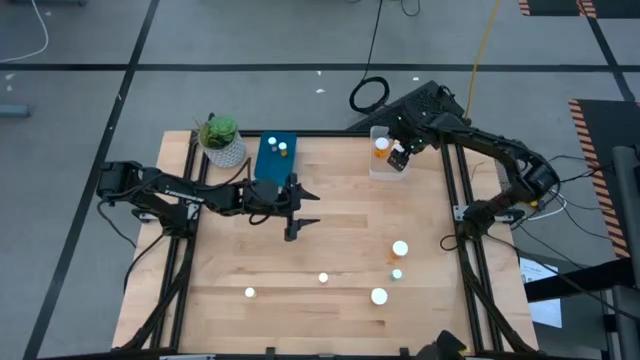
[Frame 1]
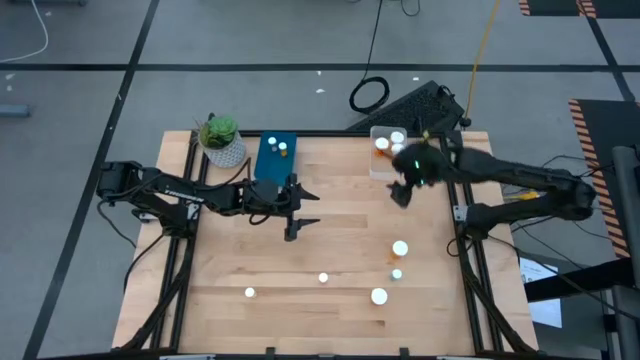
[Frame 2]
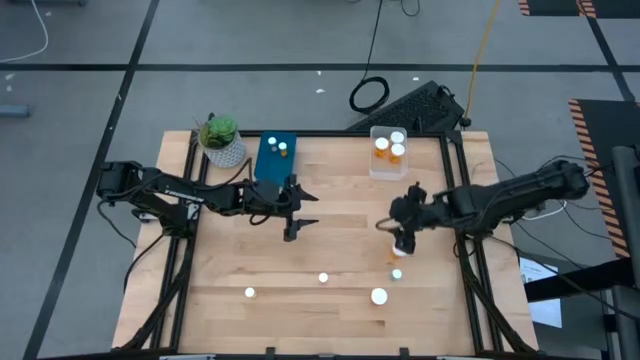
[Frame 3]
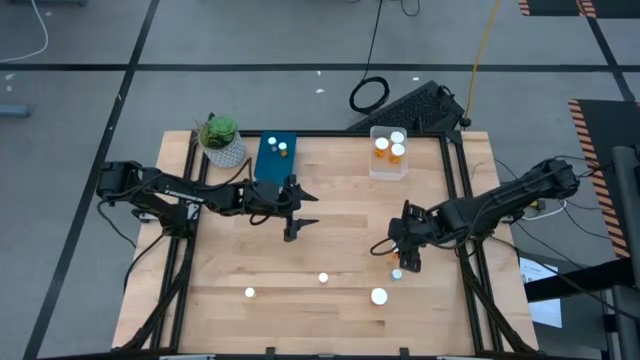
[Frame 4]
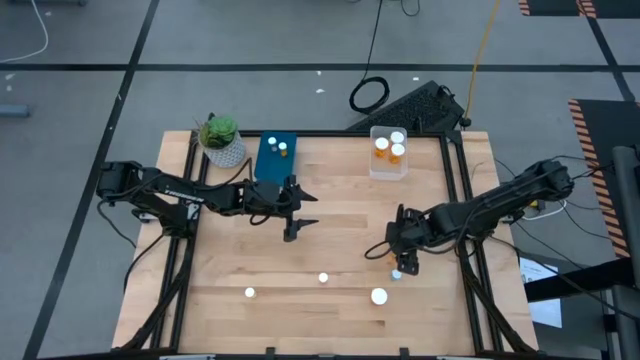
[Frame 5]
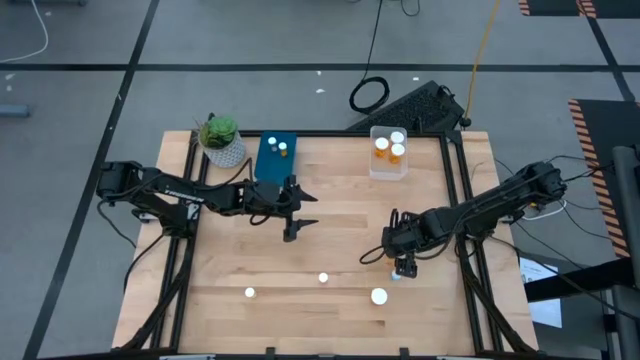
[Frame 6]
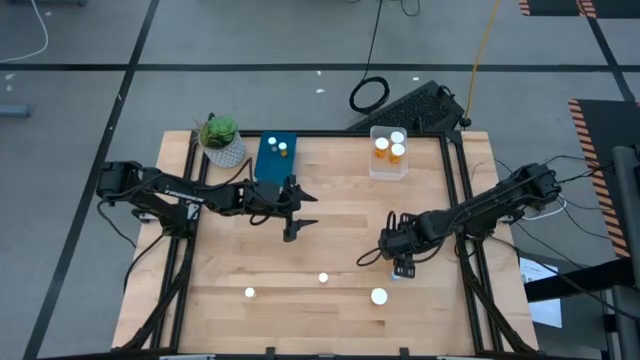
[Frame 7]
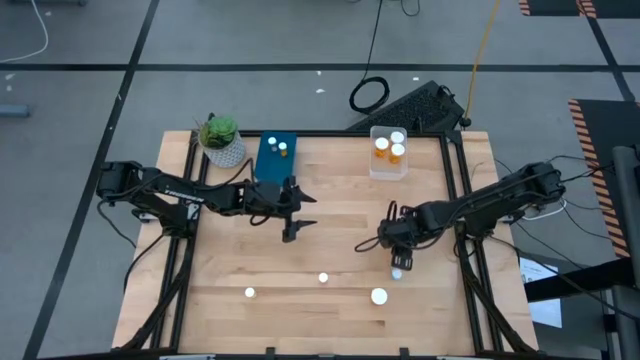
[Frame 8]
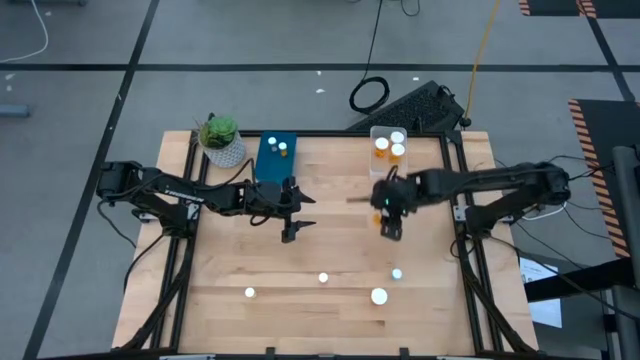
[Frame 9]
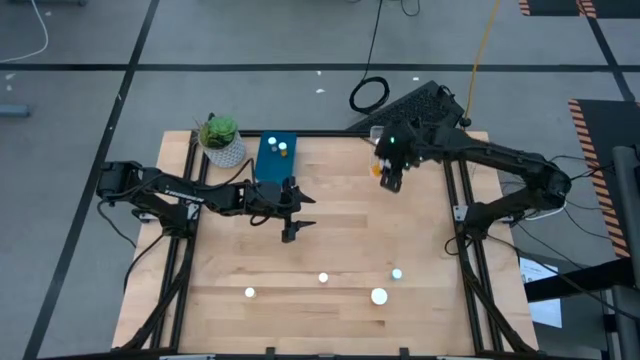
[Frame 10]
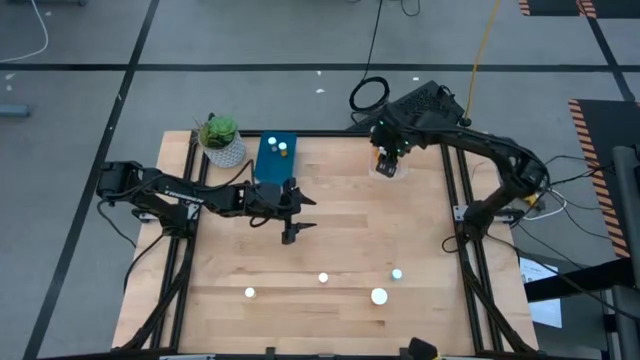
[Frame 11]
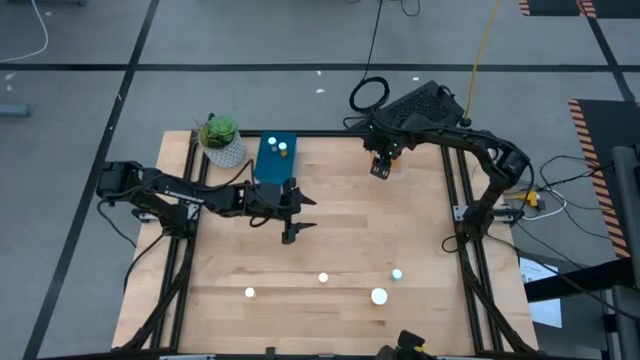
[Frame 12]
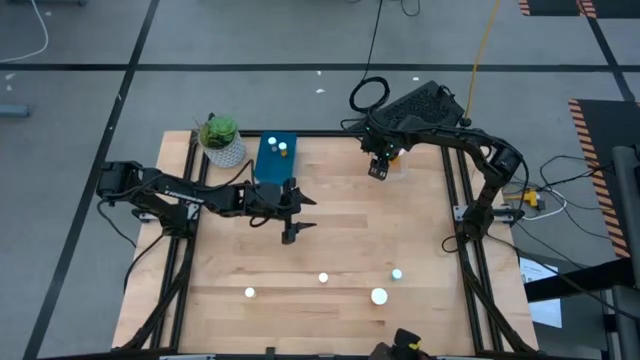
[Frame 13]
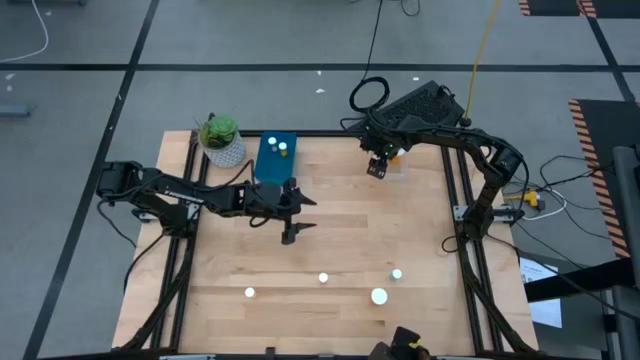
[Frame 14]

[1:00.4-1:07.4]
Task: Pick and place medicine bottles into bin by pill shape (circle, oval)
Put the orange bottled capsules into the transparent bin

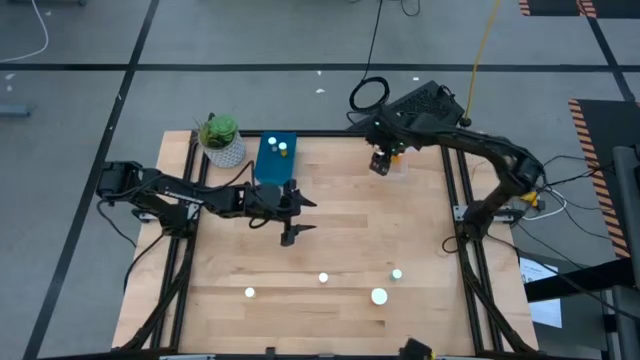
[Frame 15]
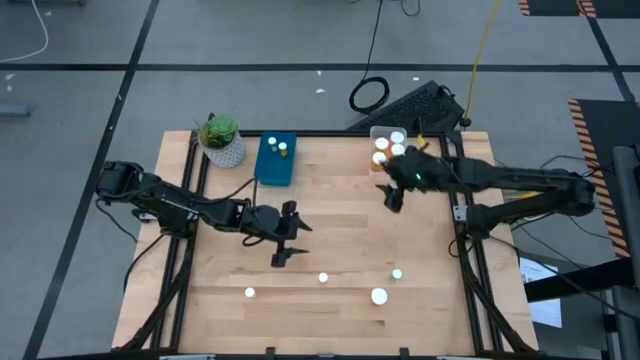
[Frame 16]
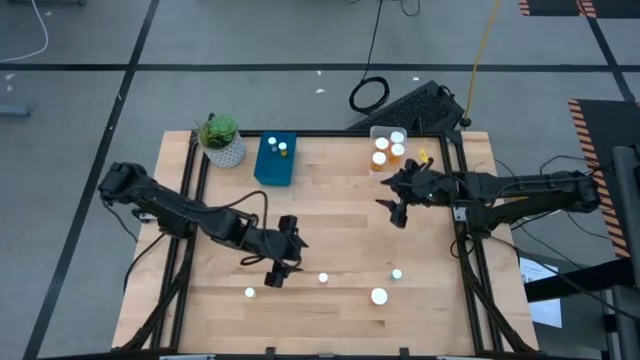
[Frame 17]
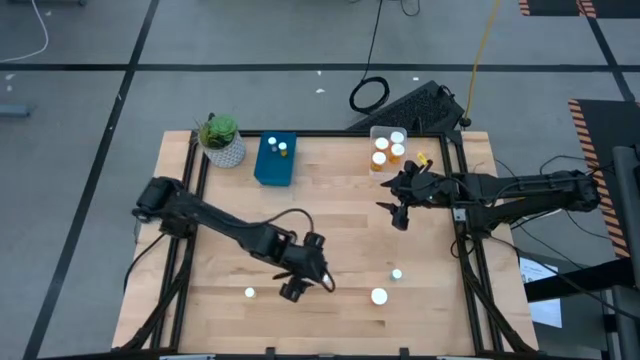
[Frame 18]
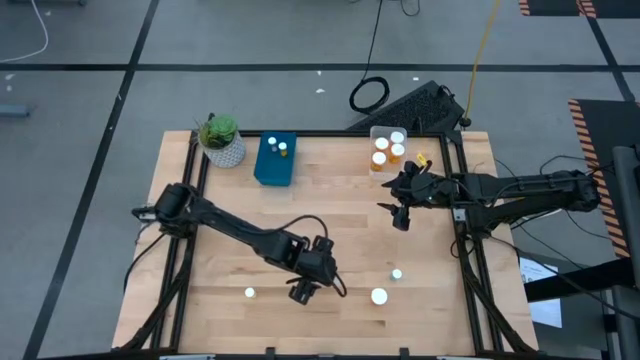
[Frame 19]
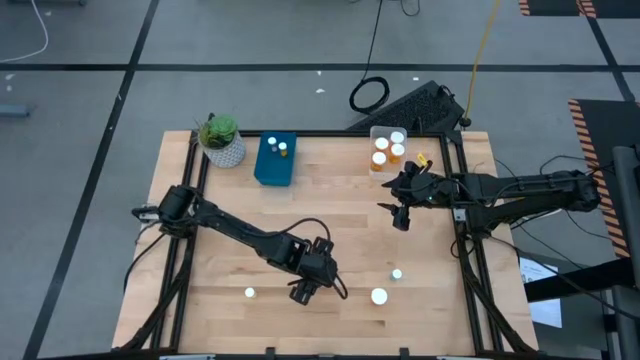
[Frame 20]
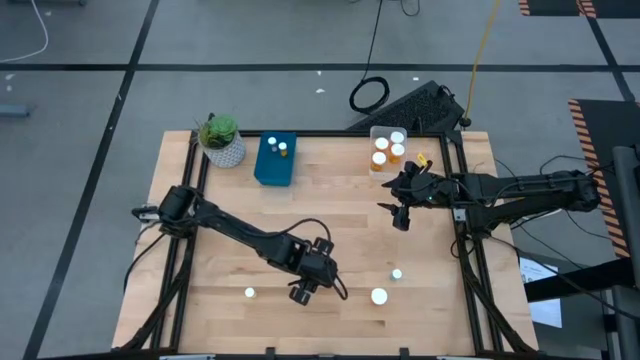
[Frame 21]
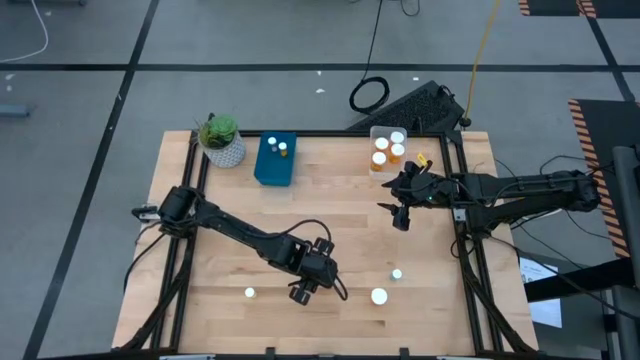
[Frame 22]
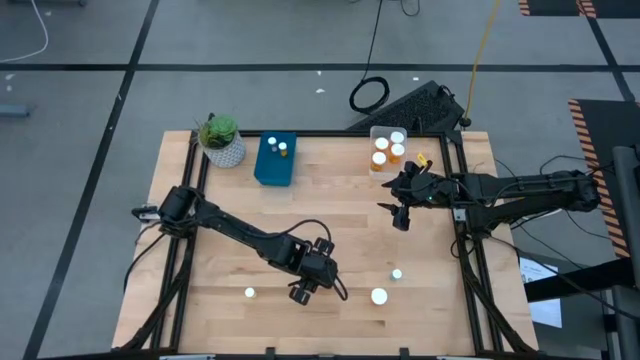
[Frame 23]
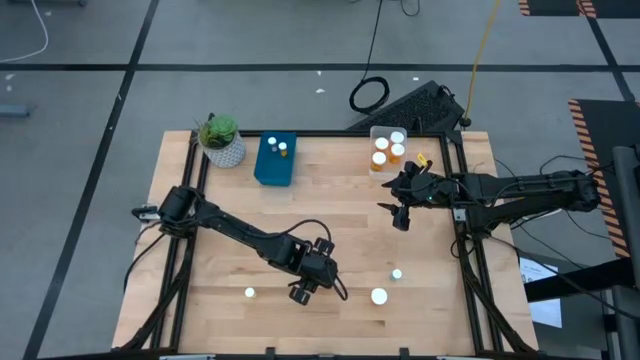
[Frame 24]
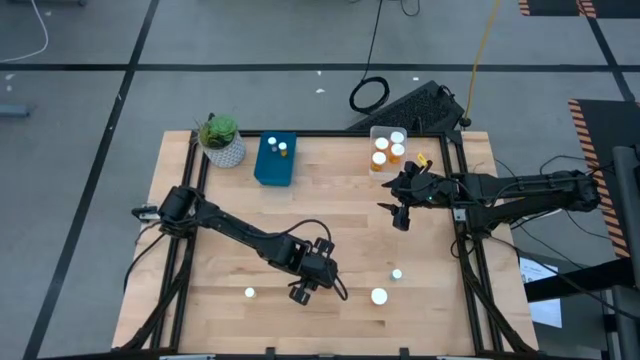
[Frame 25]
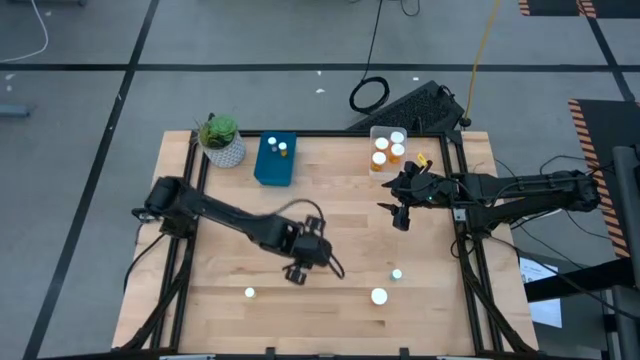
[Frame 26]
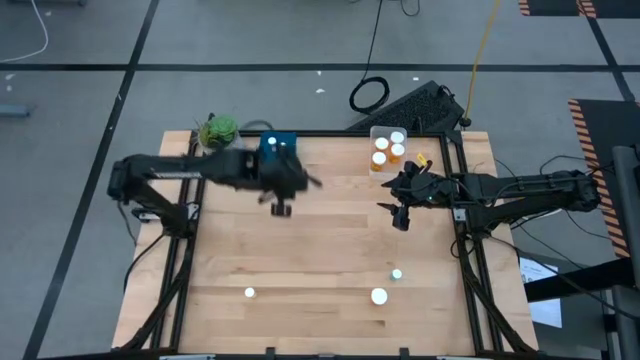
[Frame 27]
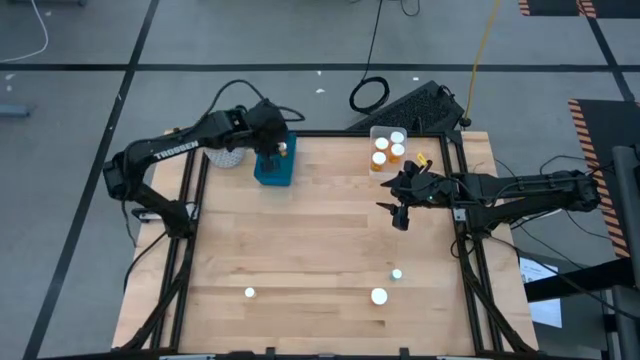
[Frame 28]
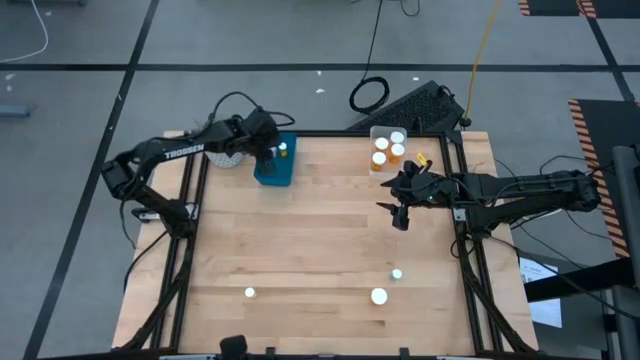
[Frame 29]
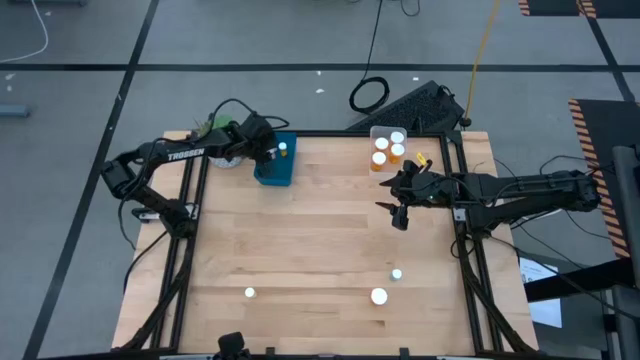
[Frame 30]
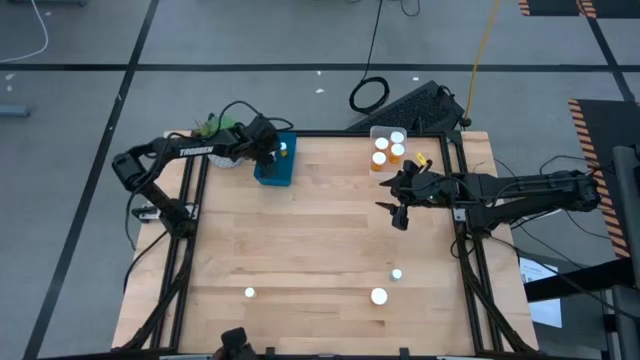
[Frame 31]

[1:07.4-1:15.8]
Put the pink bottled tablets into the blue bin
